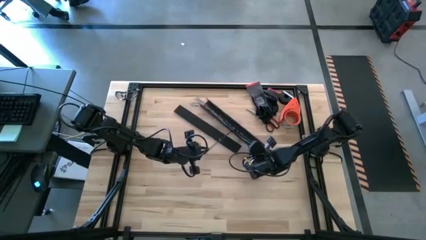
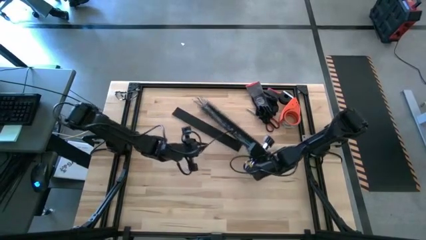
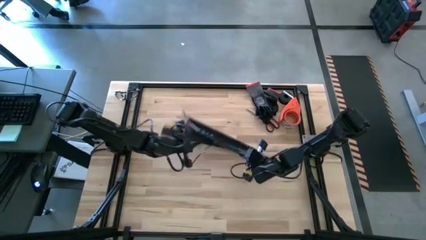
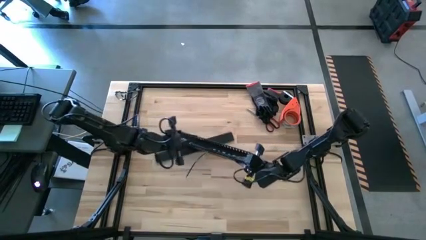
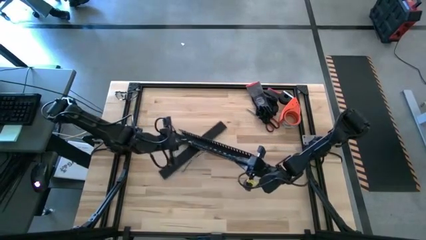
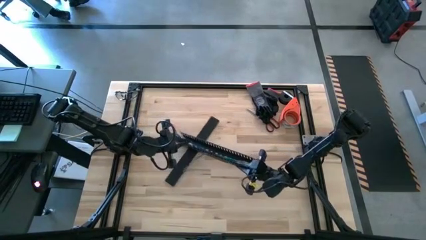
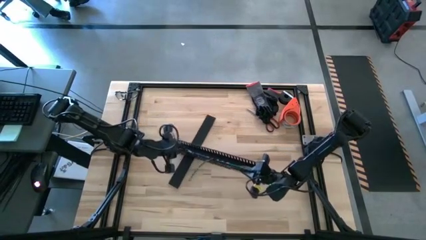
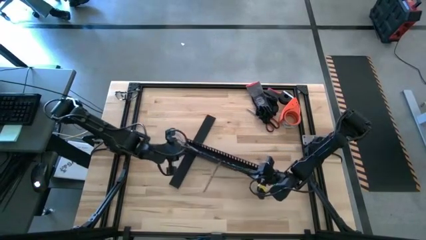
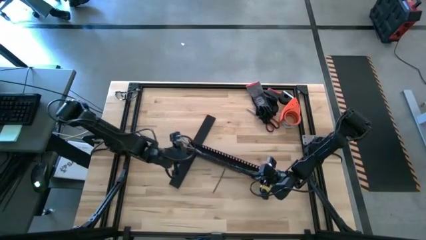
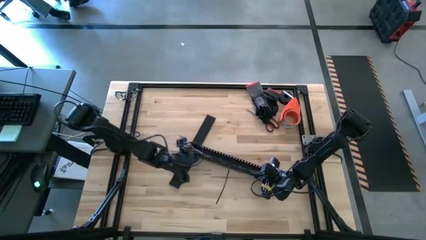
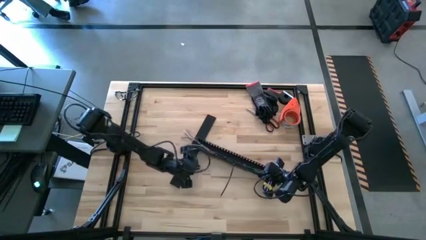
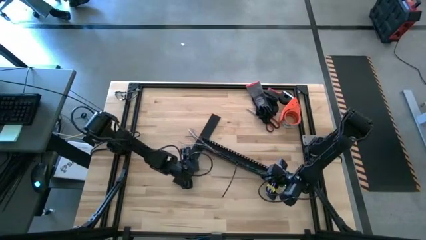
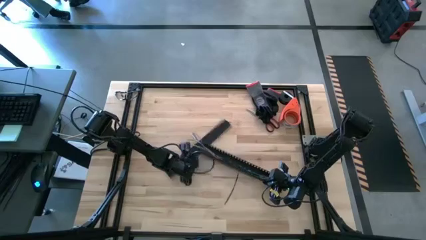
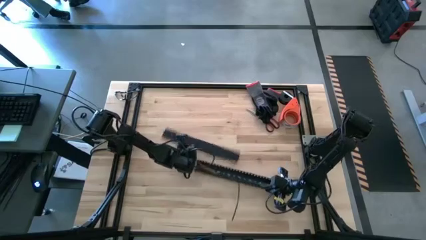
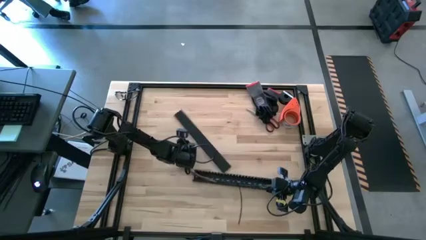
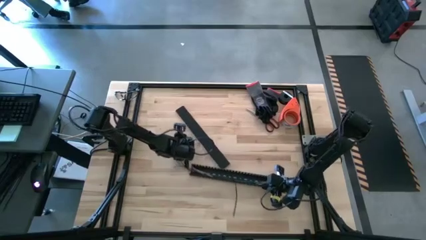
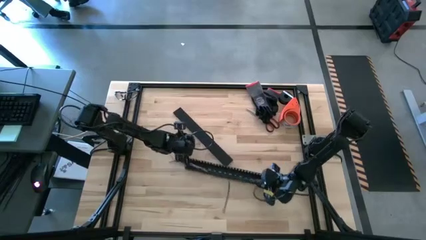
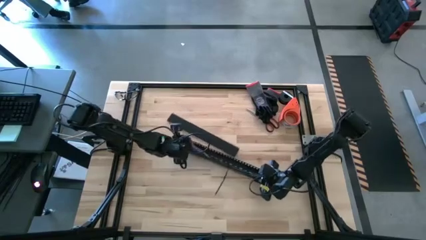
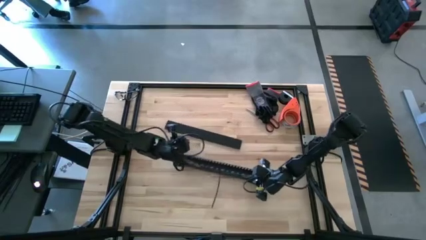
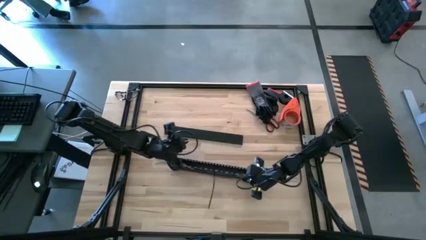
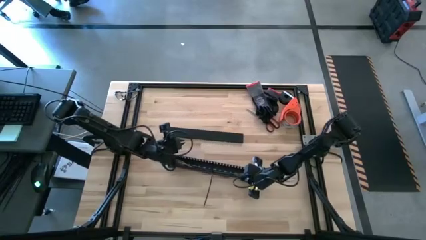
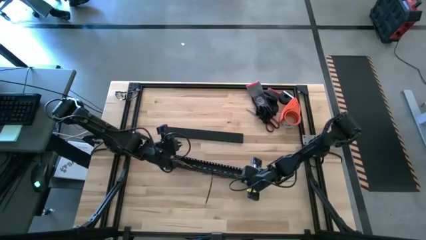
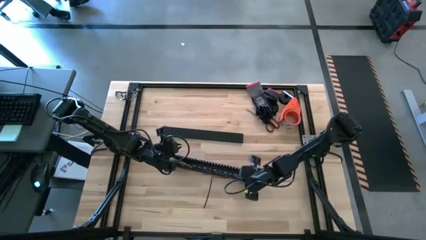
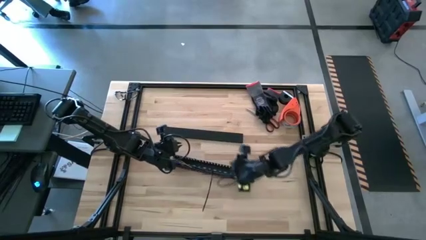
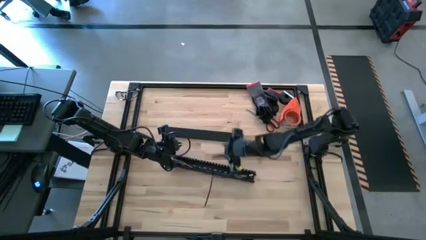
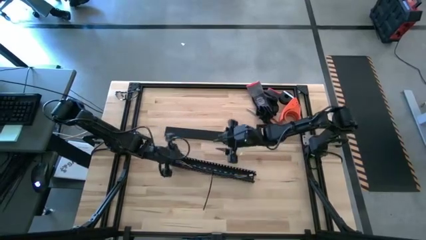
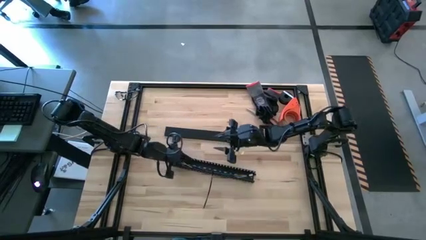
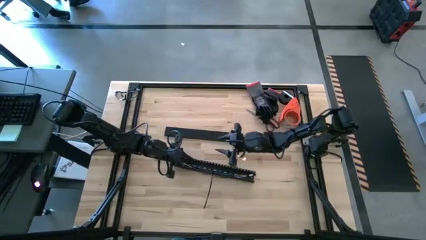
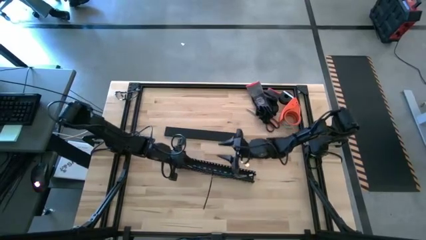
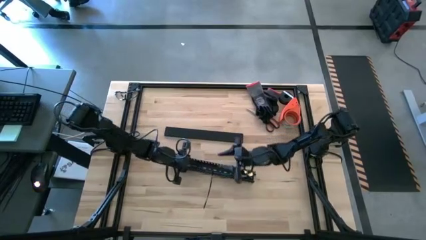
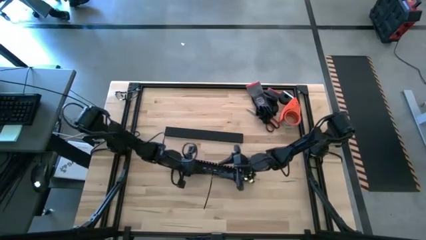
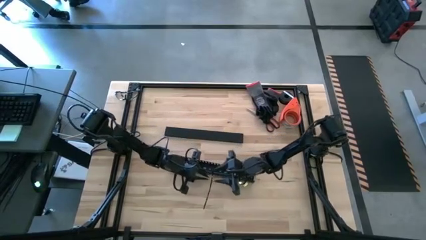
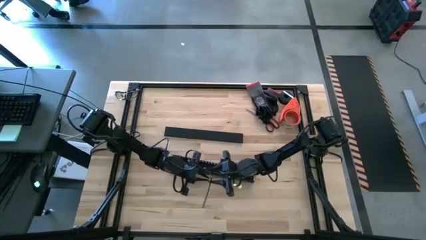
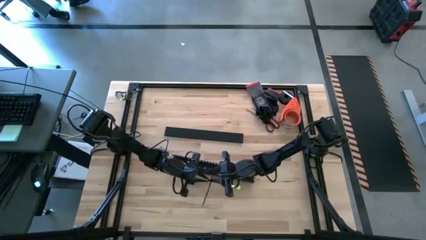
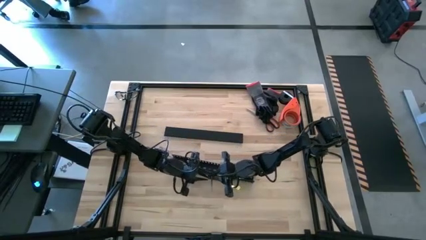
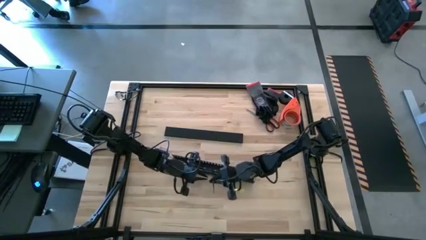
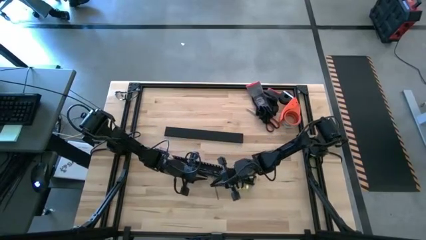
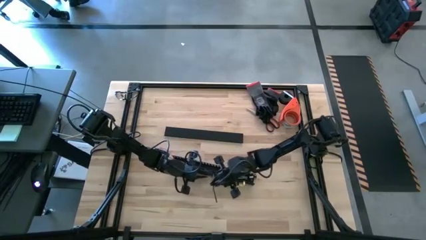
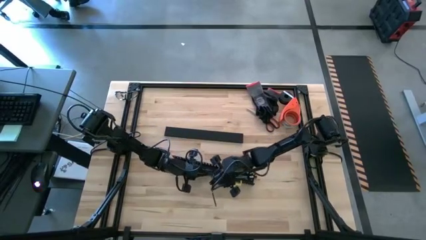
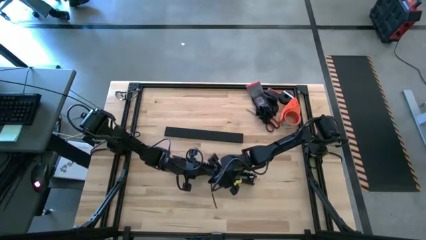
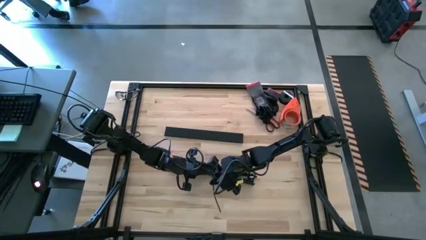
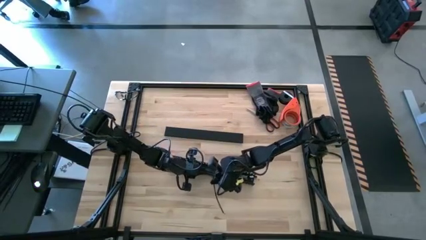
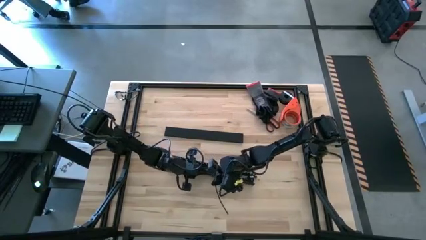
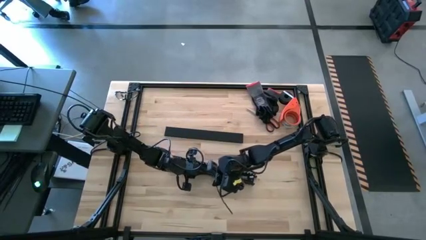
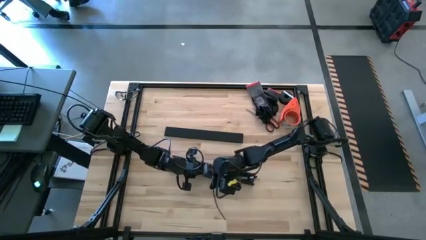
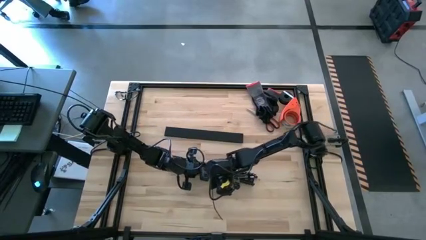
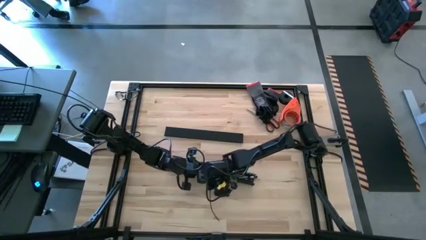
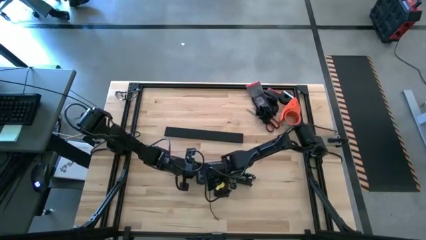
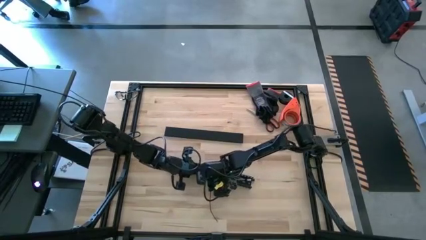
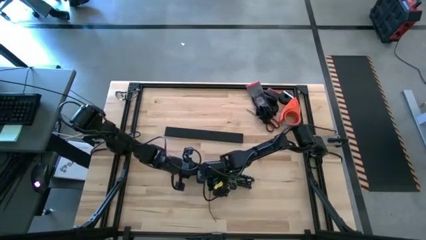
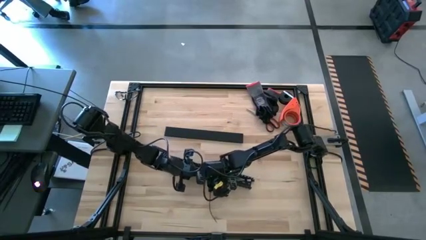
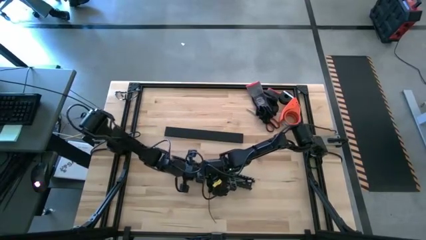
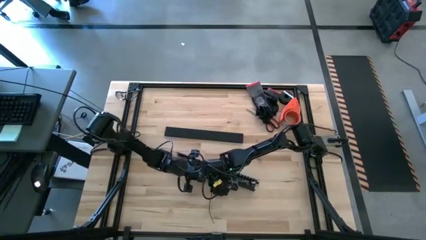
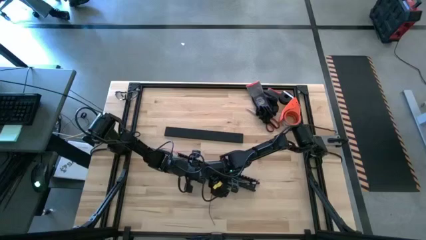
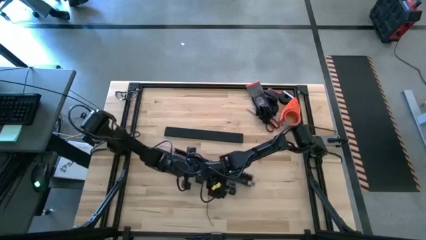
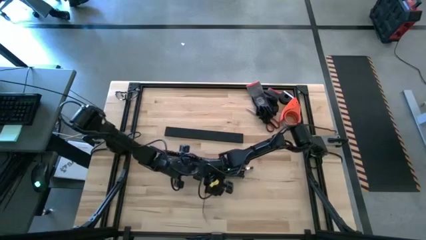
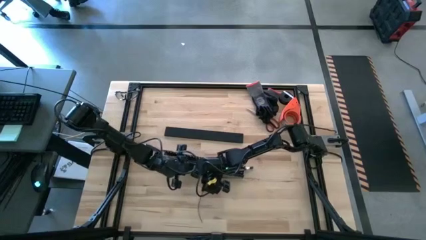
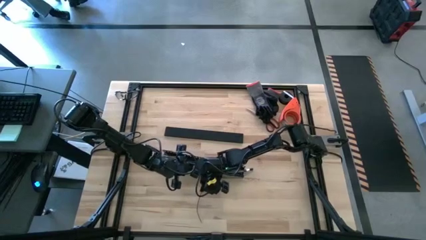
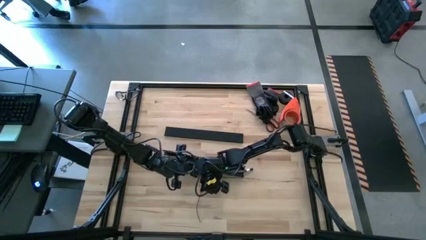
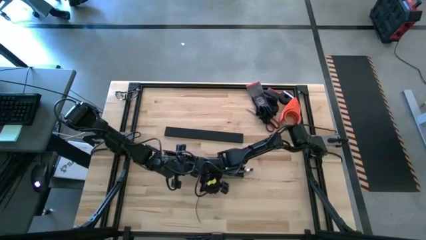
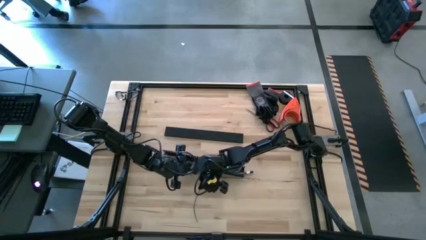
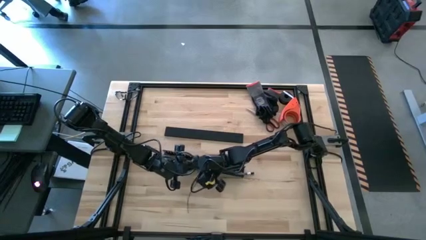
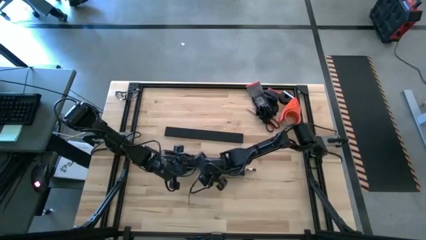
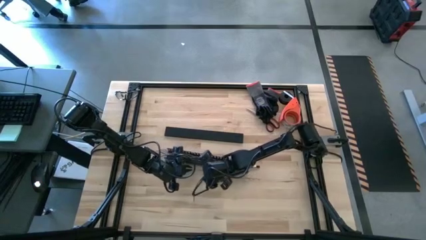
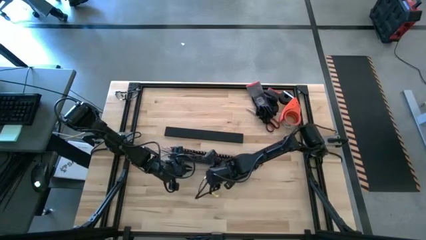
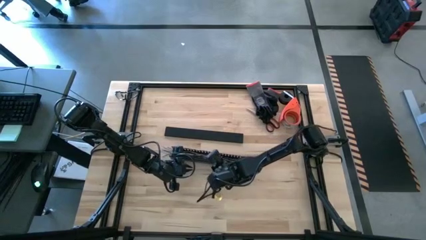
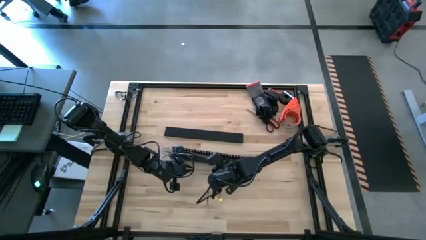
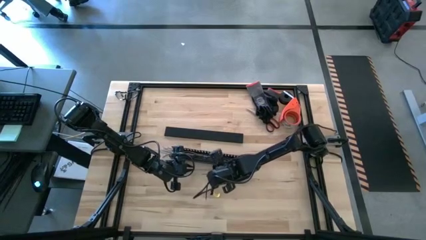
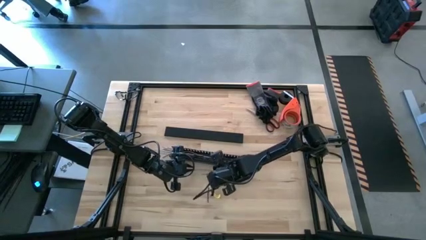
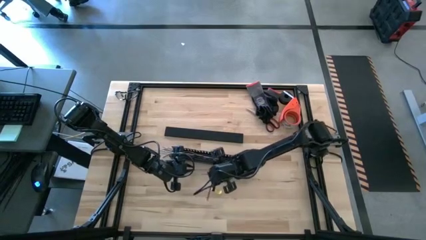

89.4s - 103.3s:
Task: Ziptie cables
Put the zip-tied cables into the cable duct
